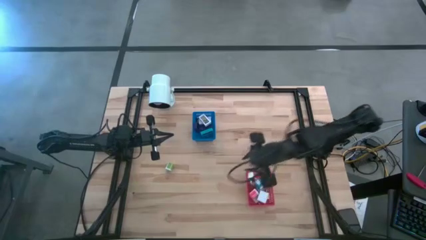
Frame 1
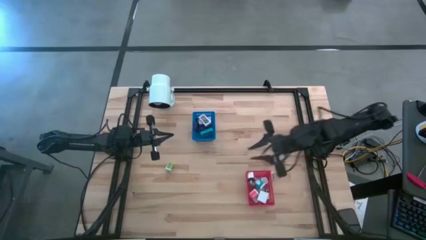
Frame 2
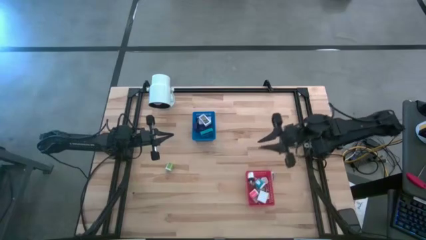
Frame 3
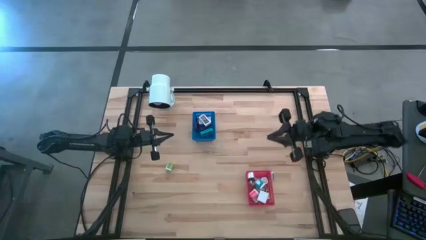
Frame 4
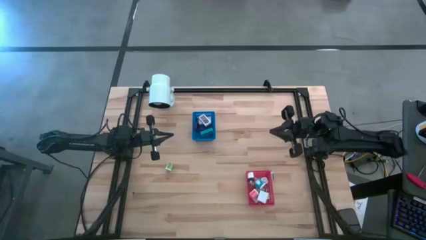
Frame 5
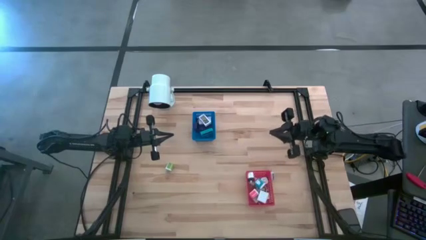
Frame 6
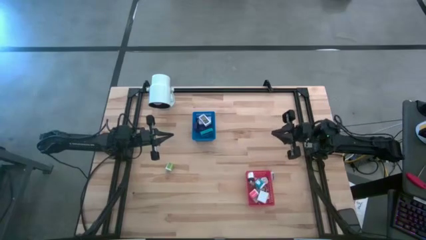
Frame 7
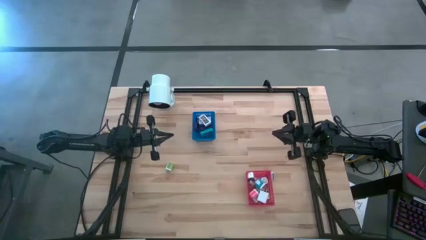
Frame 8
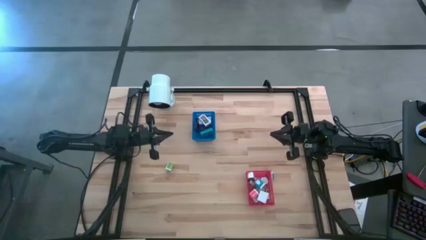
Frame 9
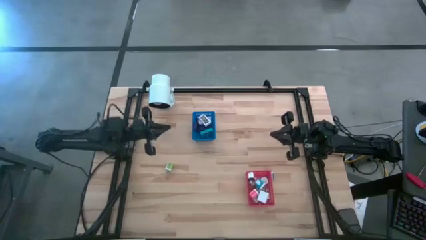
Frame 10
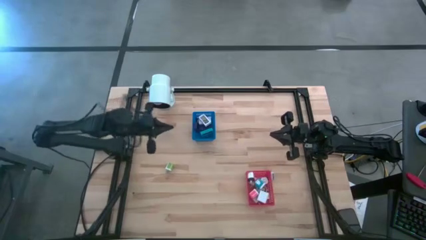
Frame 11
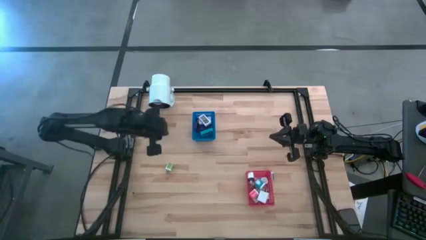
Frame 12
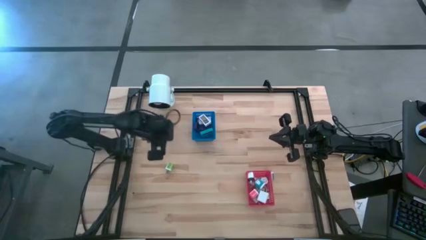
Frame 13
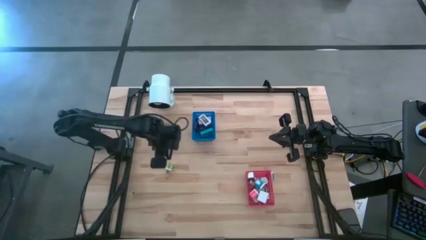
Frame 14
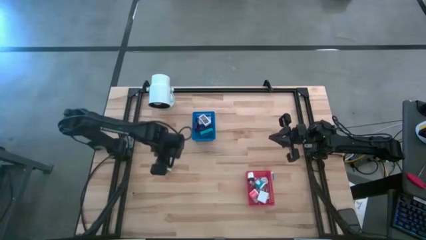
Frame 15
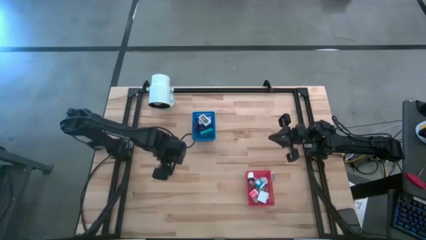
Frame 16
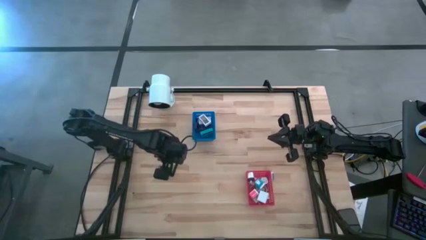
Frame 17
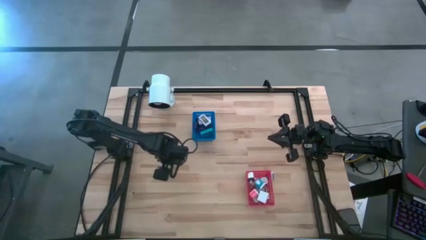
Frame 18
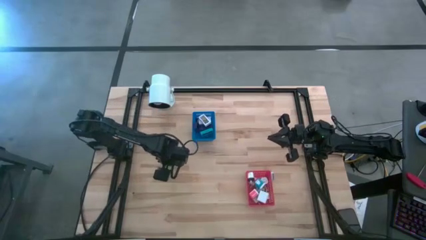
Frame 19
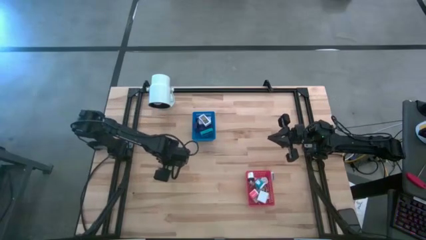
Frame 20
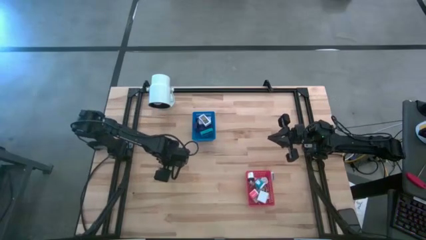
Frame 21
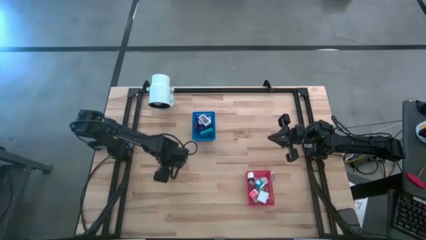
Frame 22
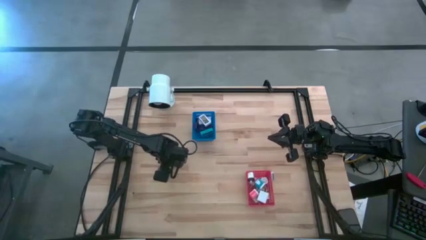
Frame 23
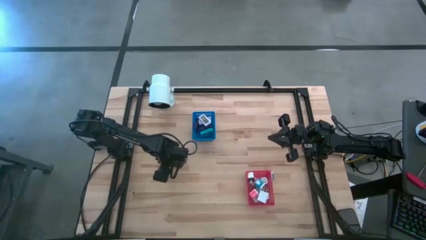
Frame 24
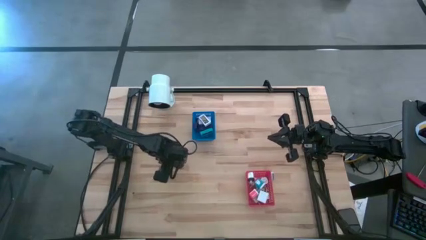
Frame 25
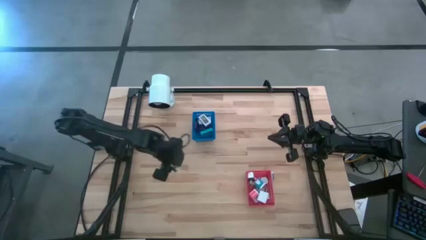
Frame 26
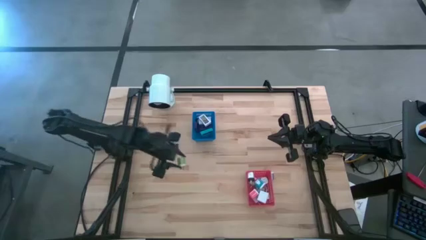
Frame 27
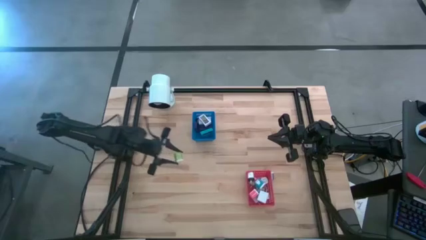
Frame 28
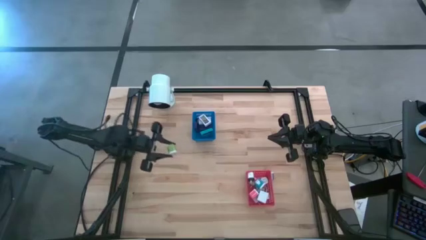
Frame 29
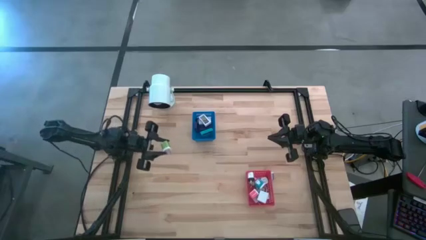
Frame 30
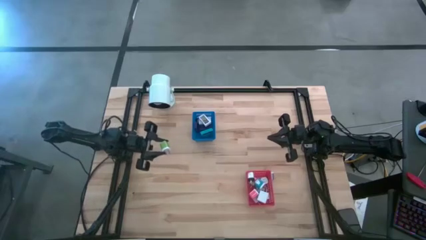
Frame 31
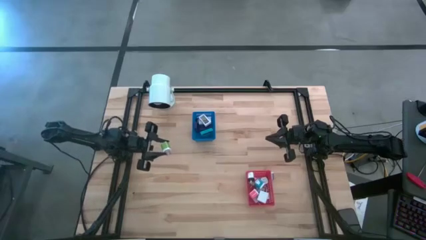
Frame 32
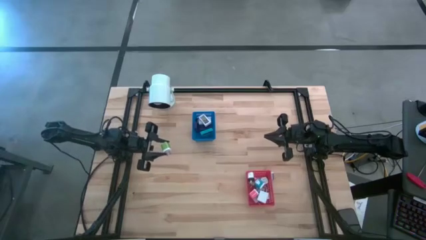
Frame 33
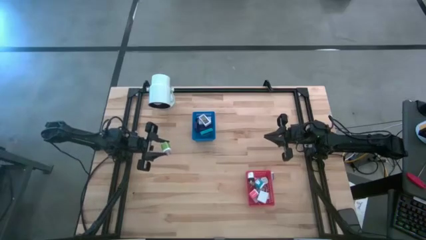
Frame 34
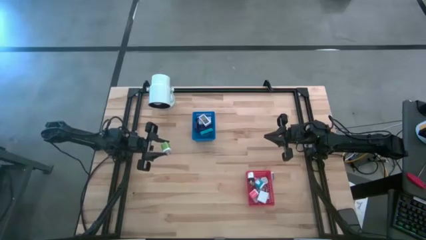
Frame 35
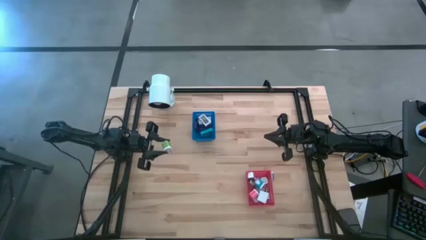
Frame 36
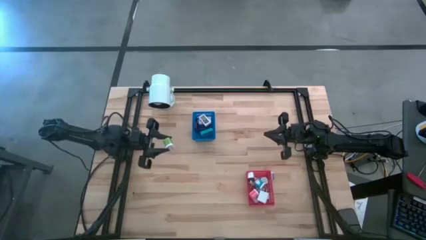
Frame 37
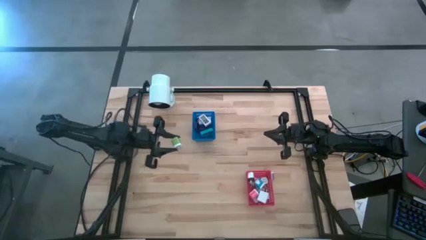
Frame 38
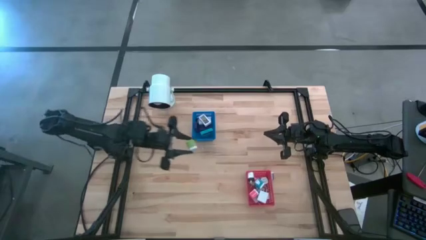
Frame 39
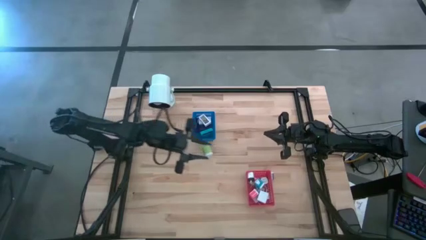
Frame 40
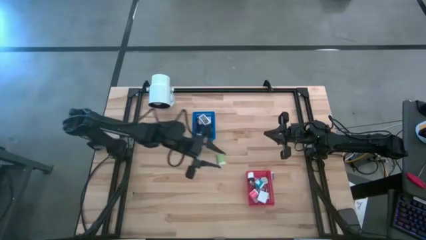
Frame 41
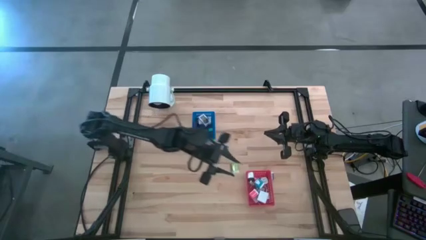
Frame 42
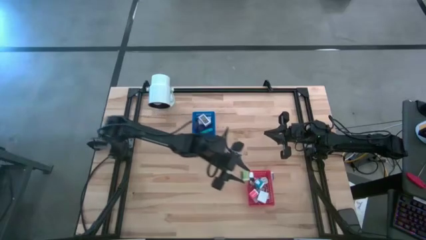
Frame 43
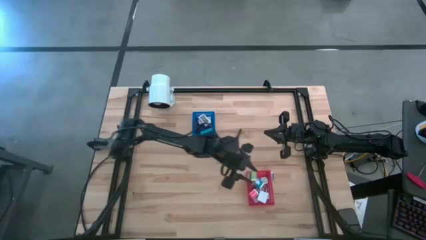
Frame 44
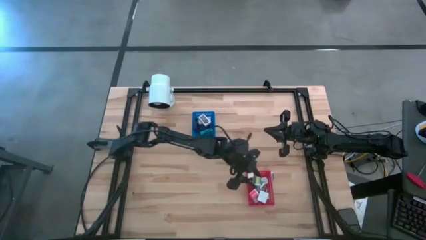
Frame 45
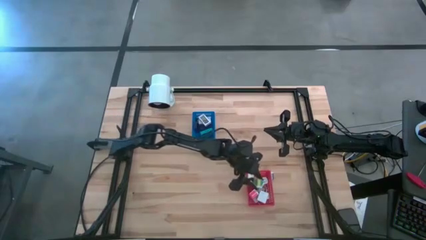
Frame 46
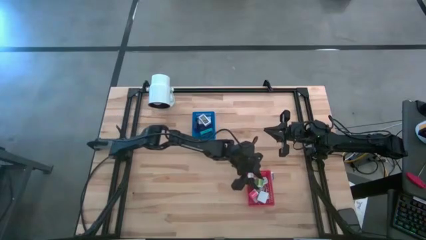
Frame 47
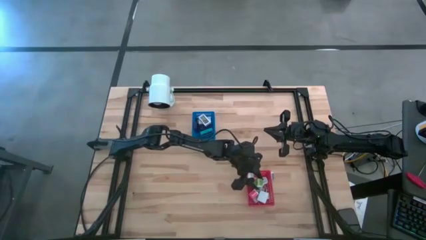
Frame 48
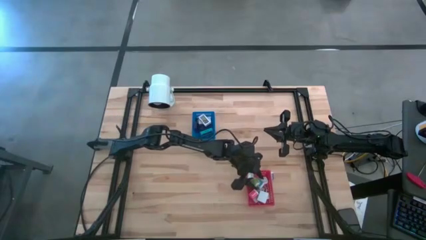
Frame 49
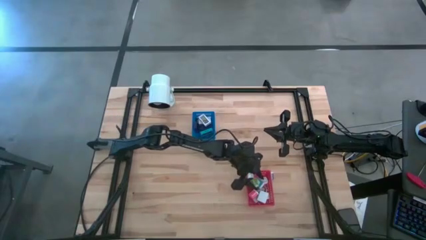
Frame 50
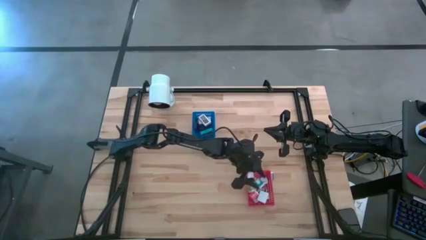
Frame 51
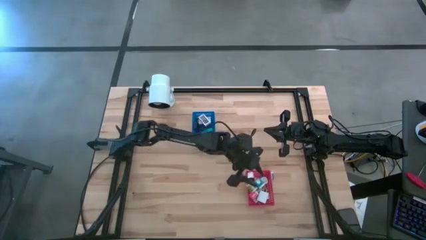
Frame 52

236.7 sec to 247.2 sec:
Task: Pick & Place Office items
Put the green charger adapter into the red bin

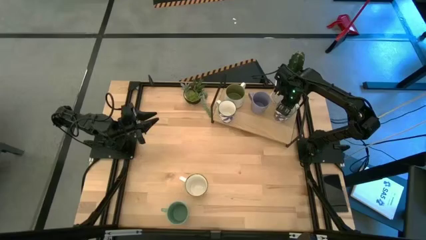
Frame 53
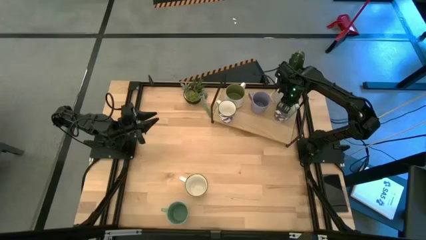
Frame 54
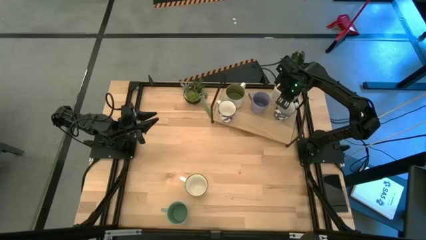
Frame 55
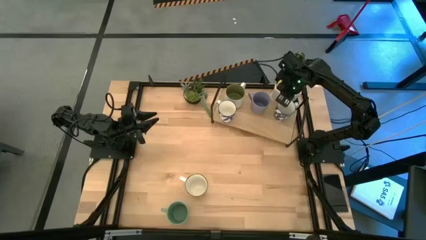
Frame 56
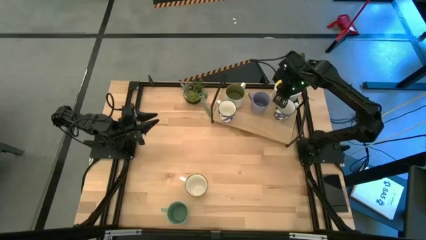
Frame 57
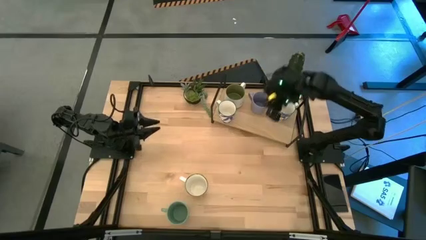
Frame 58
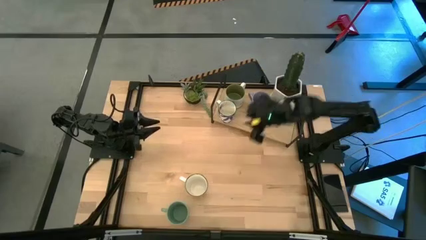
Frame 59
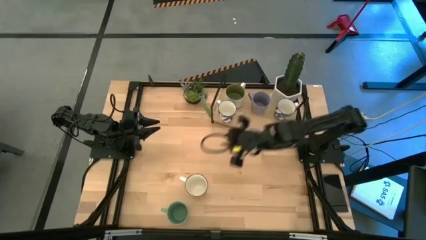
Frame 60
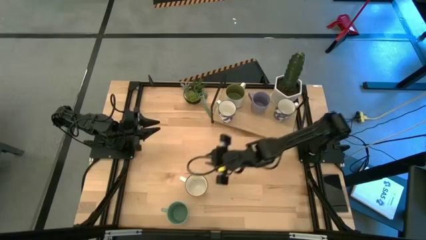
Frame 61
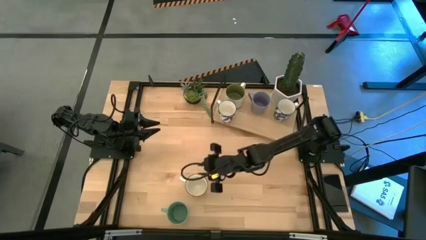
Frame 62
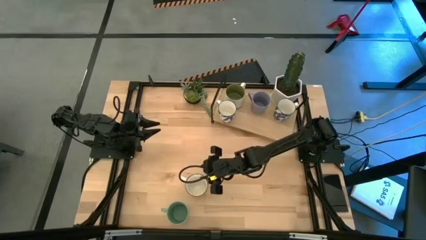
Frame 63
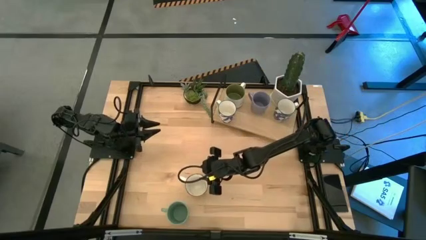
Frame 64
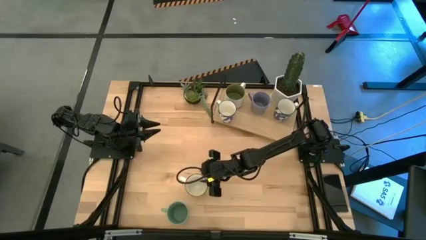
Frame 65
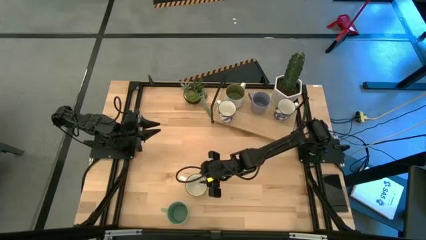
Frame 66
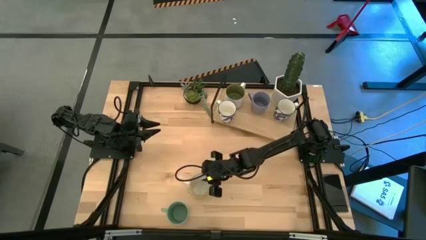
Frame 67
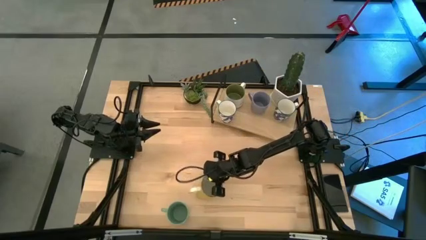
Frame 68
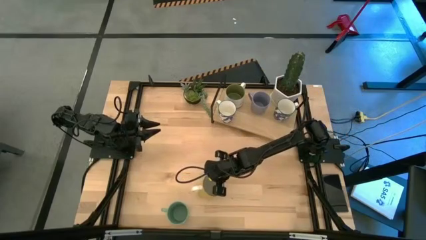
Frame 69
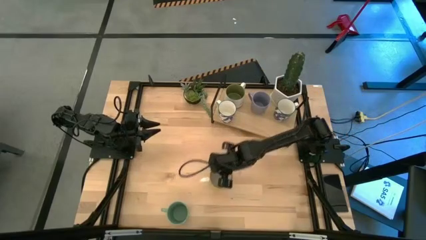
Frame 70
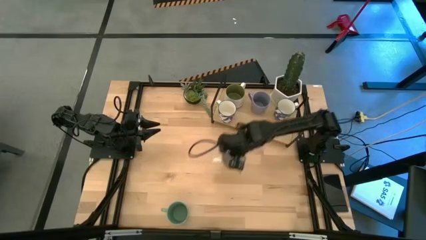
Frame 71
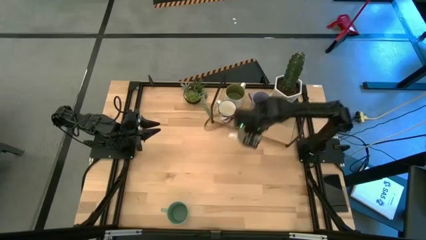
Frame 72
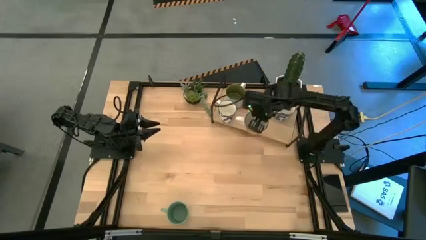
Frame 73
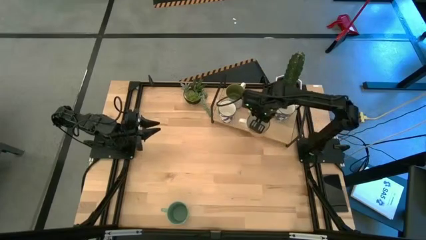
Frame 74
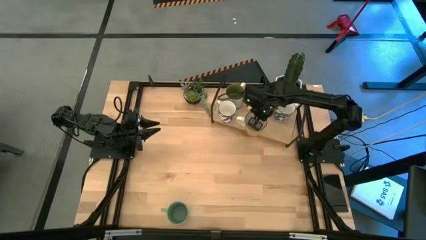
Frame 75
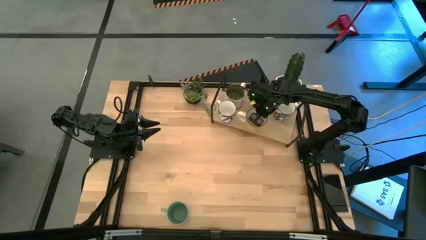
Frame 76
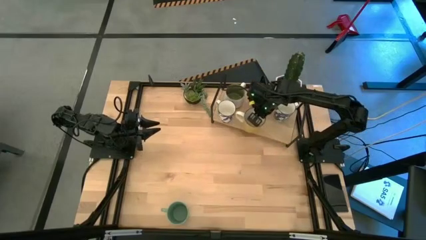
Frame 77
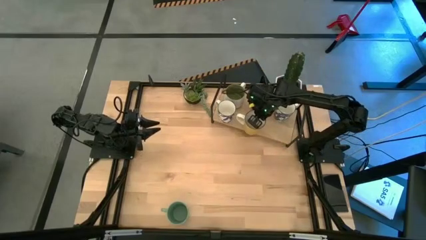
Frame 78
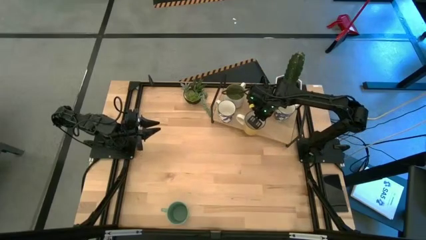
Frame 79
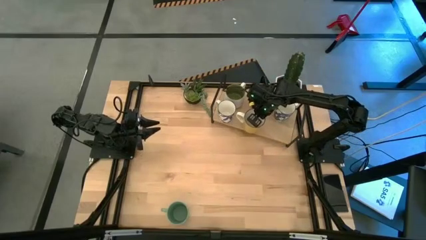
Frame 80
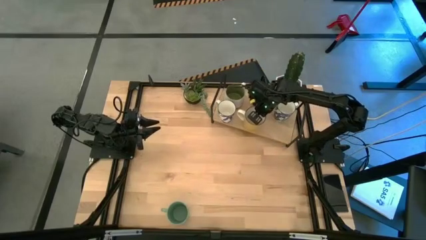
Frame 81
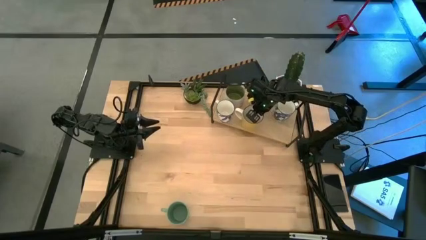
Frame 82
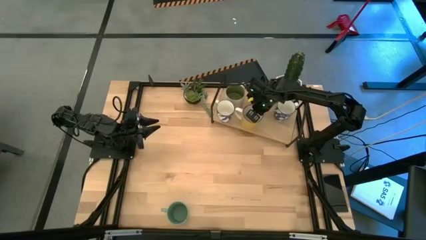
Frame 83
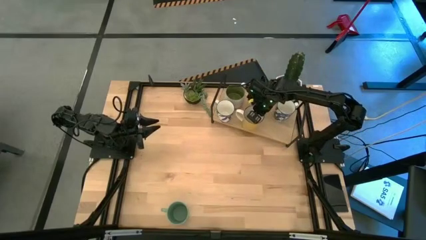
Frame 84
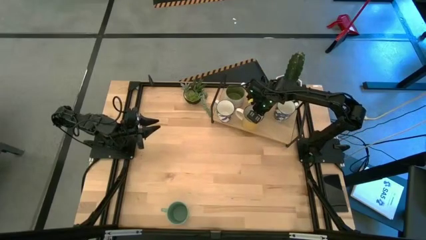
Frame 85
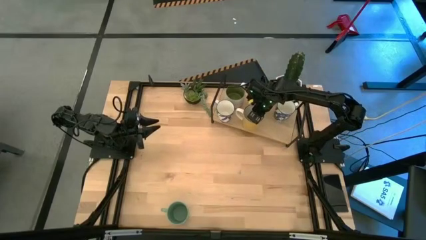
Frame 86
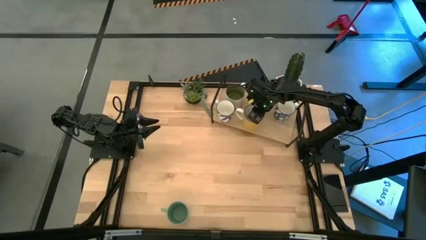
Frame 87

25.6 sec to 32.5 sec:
Task: Place coffee mugs
Put the yellow mug aligned with the light blue mug on the shelf
